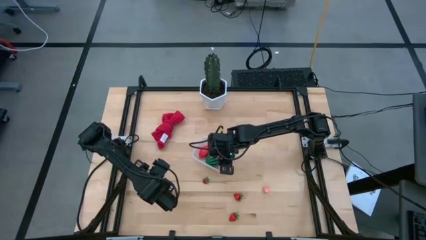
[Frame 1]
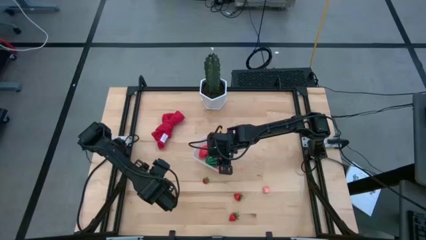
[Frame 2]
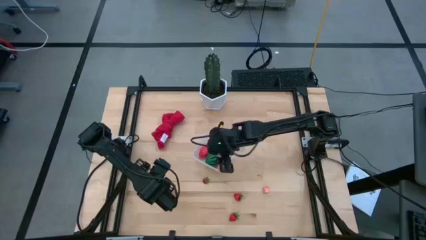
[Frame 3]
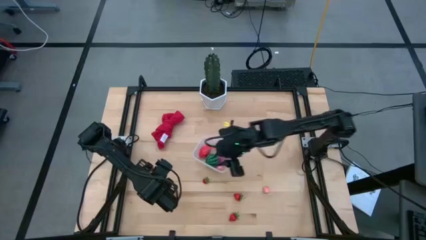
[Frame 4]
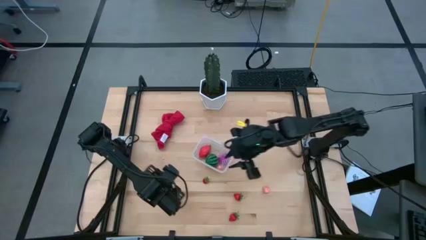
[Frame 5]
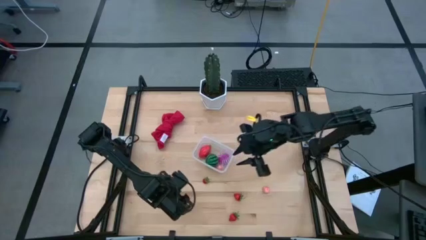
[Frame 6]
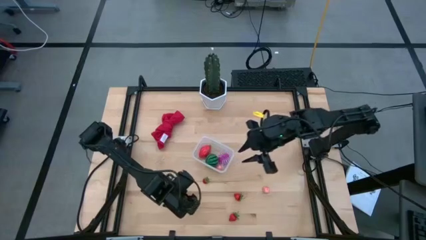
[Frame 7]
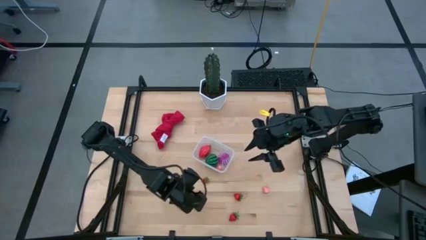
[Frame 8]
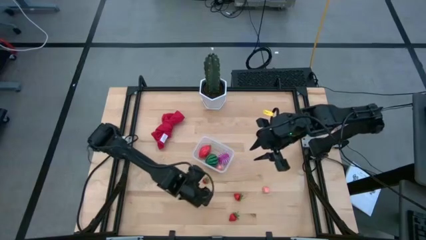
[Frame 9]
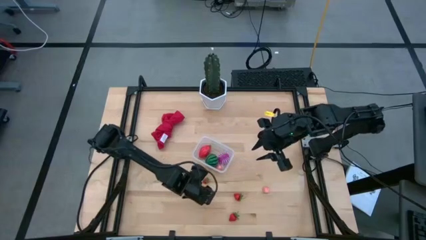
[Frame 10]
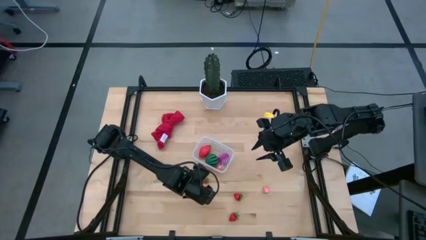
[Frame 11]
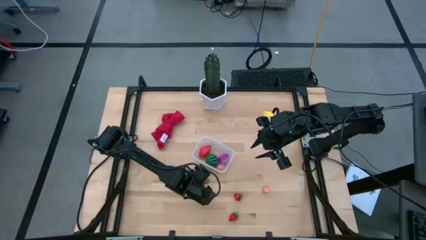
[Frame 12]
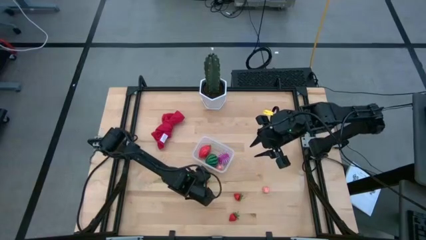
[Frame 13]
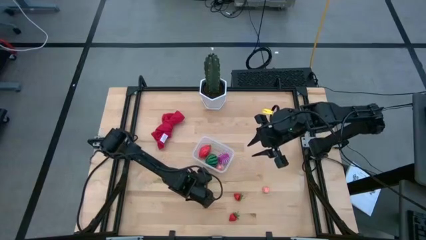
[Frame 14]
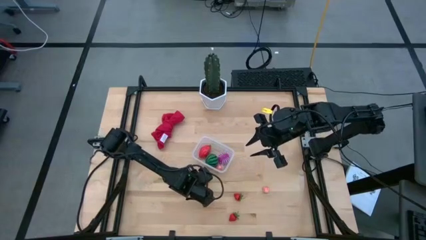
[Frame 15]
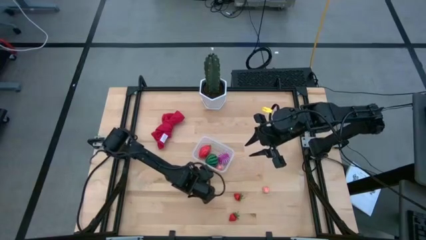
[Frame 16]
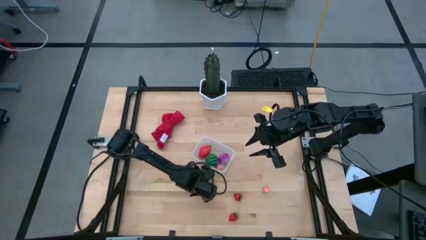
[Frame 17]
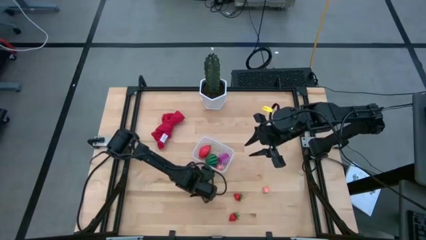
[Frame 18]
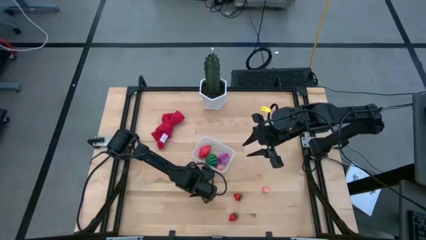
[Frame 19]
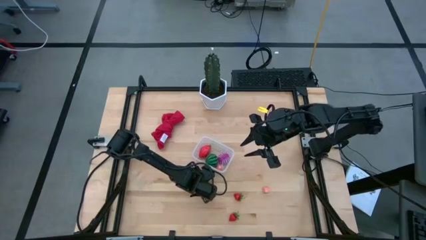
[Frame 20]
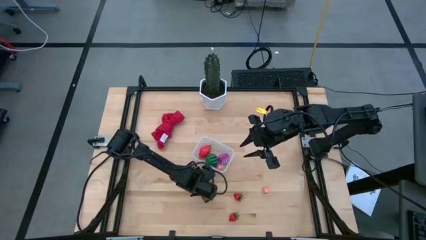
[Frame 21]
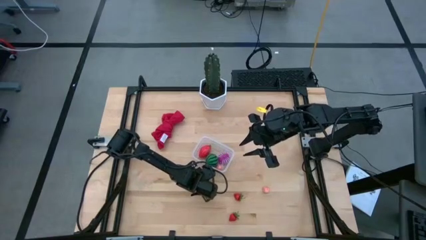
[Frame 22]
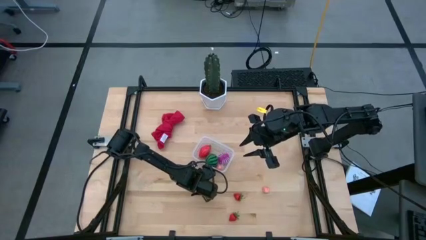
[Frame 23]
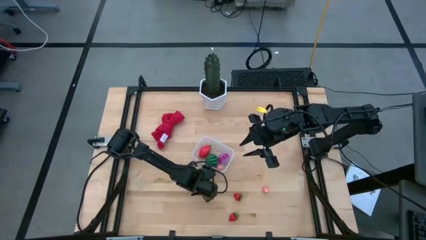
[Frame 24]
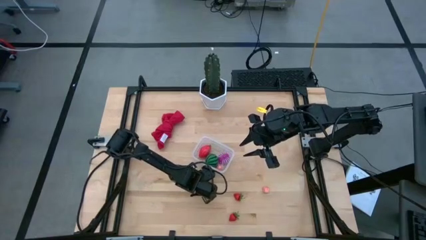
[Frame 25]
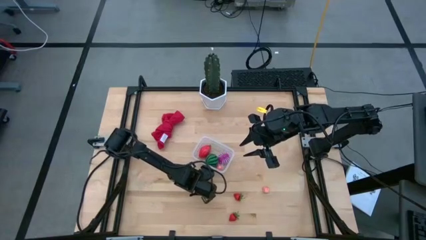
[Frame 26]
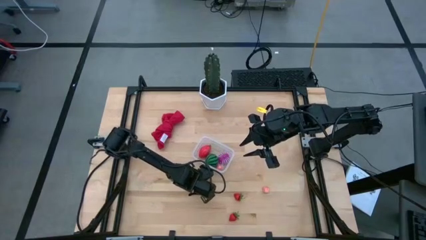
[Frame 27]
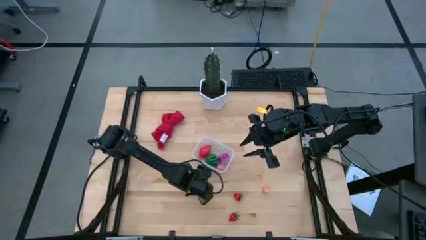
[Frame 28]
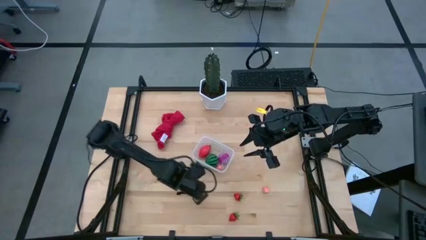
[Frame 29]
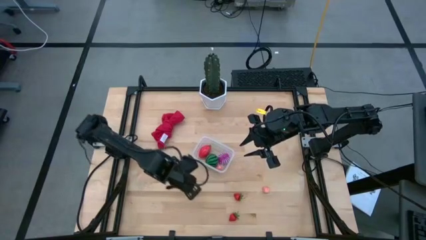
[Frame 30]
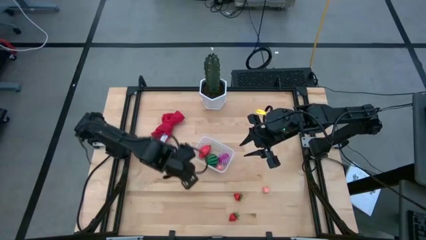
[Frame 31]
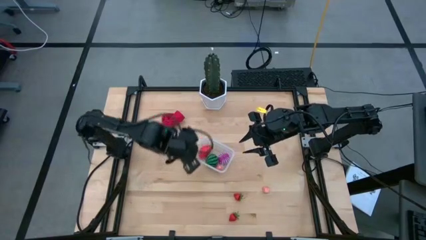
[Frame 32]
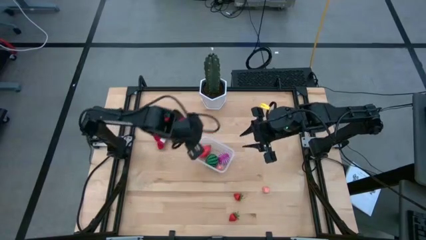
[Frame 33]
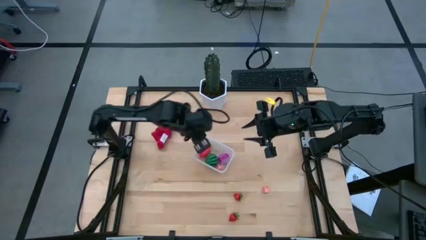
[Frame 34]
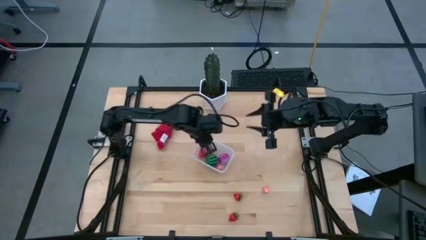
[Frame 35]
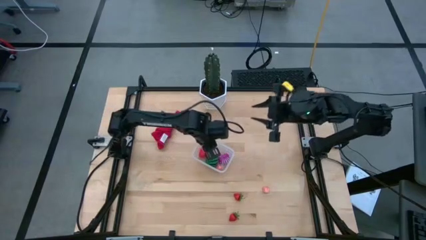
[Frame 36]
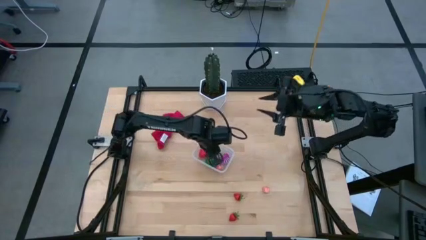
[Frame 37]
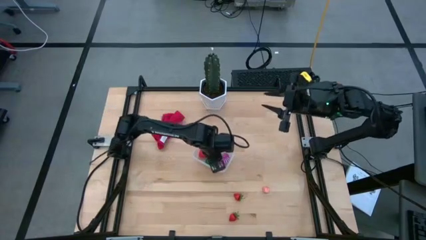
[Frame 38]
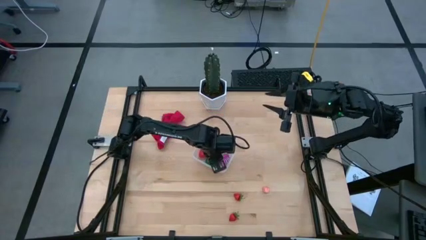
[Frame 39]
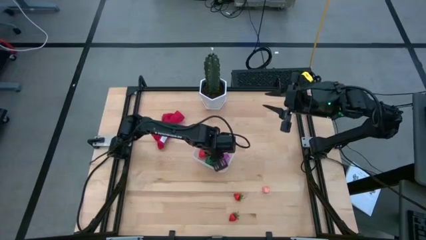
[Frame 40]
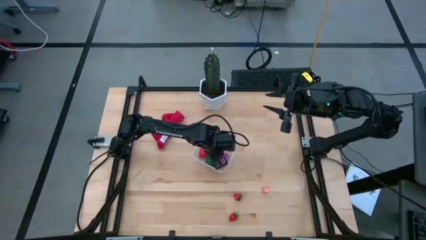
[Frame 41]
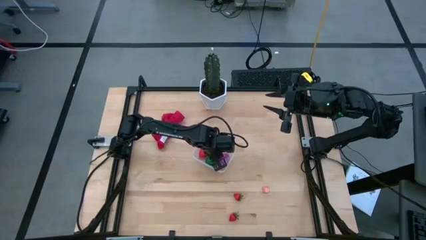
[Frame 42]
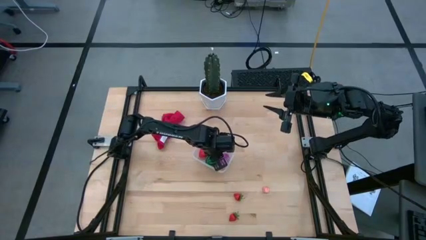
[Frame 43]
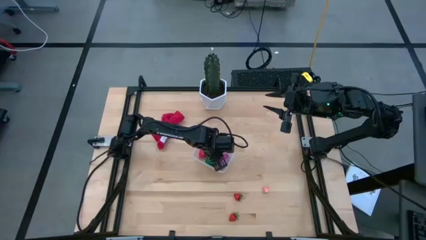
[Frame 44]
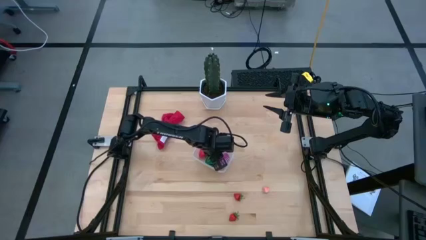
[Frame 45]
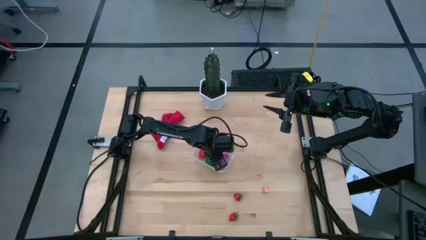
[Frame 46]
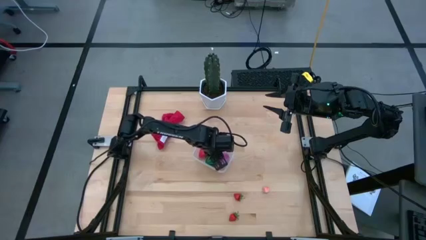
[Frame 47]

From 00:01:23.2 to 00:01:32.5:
Task: Pick and placing Produce into tupperware
Put the top red strawberry into the transparent container

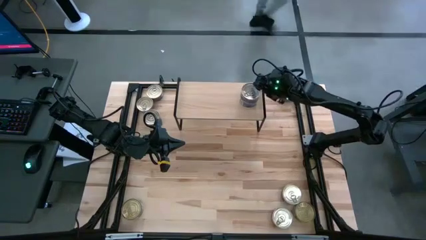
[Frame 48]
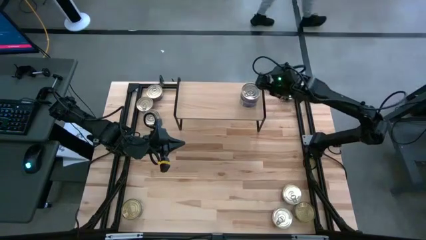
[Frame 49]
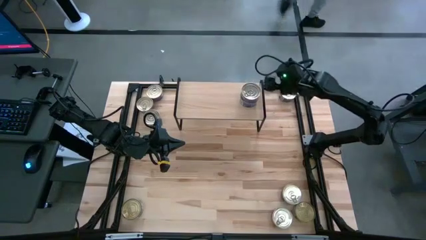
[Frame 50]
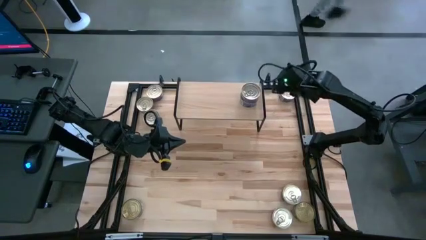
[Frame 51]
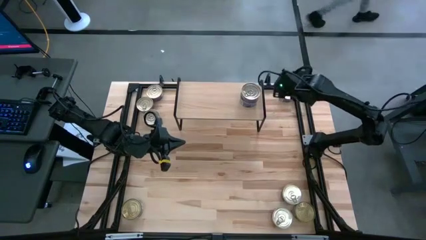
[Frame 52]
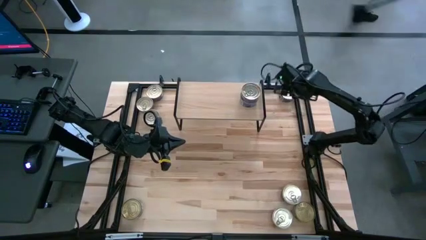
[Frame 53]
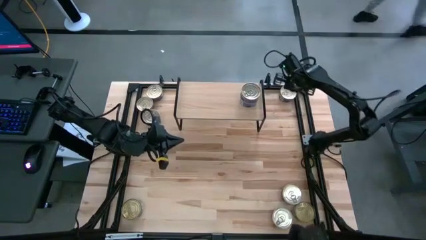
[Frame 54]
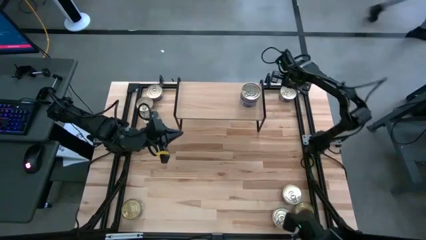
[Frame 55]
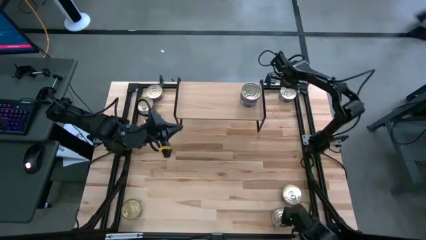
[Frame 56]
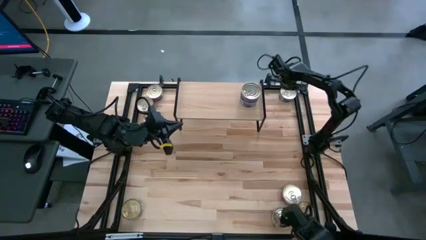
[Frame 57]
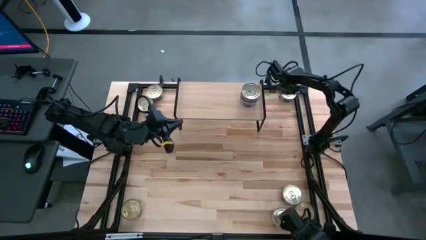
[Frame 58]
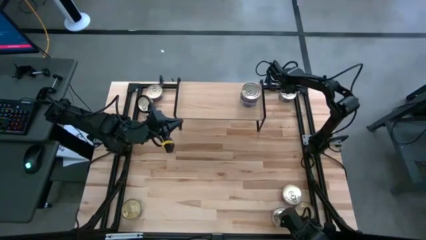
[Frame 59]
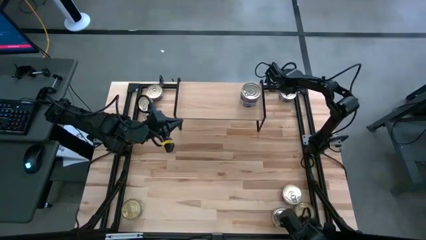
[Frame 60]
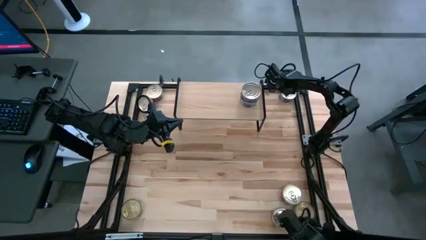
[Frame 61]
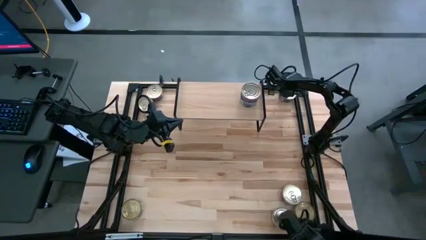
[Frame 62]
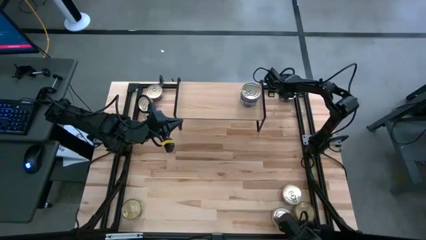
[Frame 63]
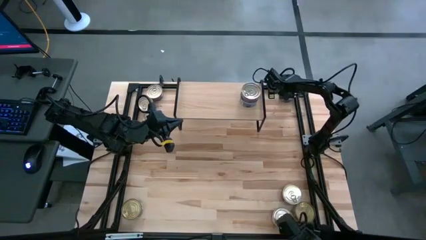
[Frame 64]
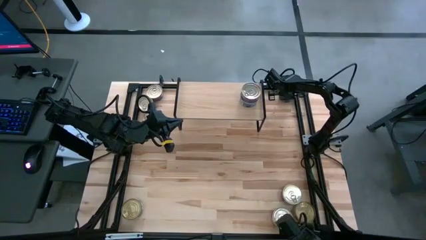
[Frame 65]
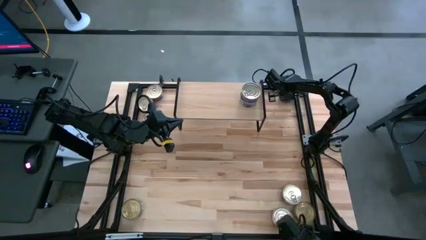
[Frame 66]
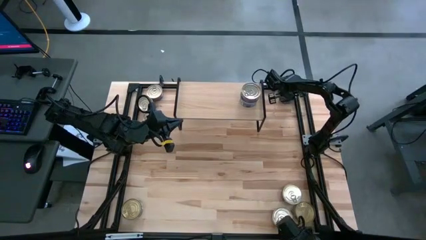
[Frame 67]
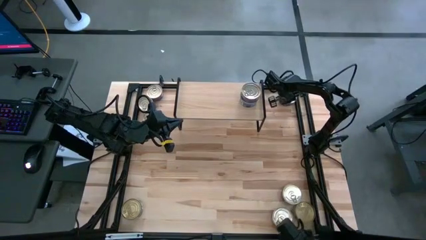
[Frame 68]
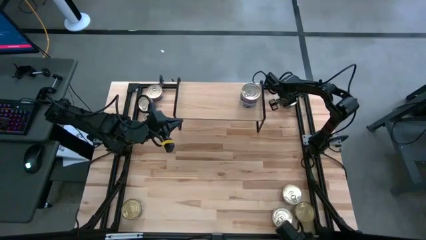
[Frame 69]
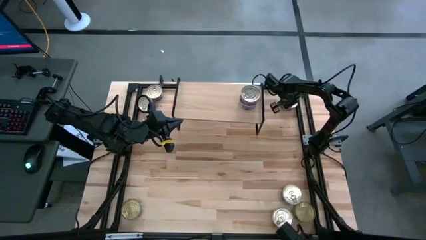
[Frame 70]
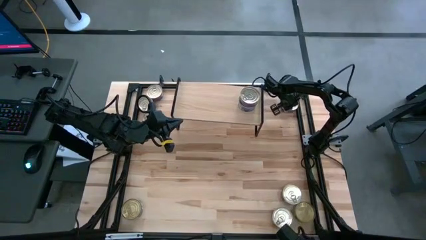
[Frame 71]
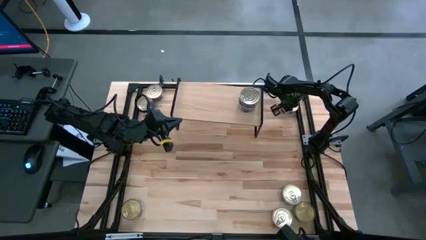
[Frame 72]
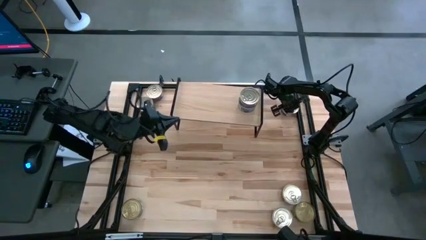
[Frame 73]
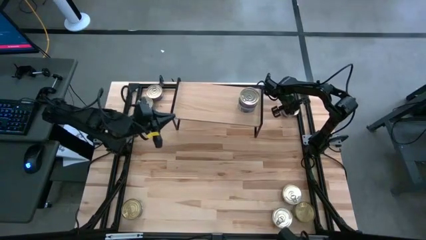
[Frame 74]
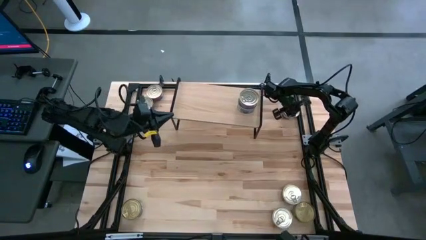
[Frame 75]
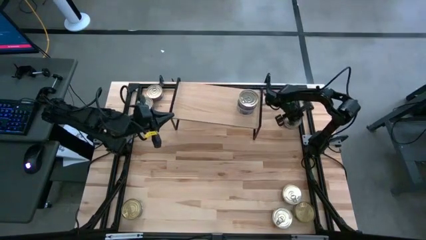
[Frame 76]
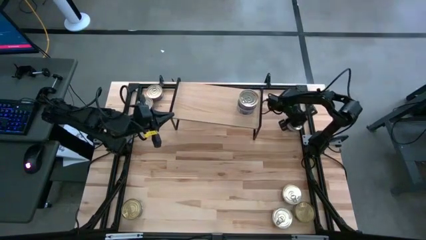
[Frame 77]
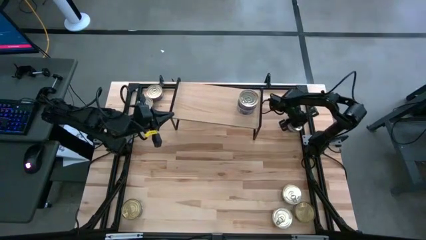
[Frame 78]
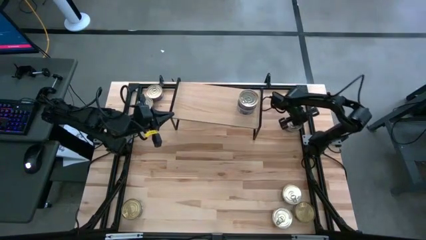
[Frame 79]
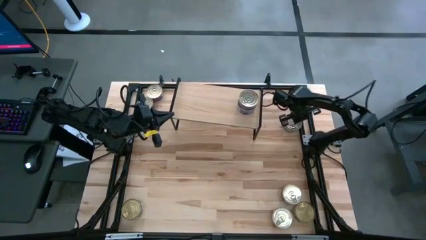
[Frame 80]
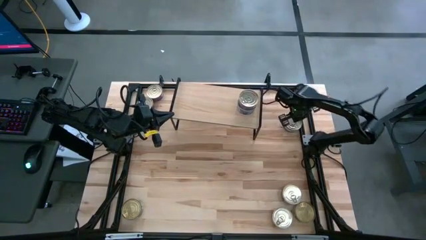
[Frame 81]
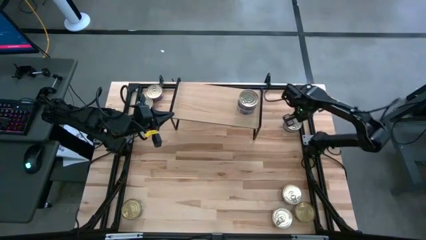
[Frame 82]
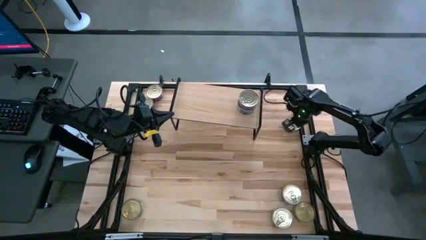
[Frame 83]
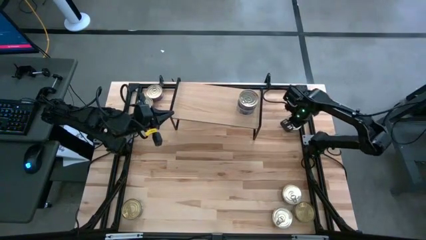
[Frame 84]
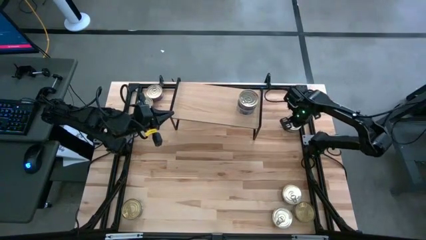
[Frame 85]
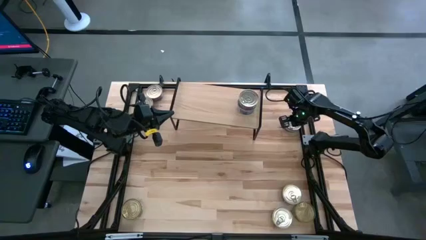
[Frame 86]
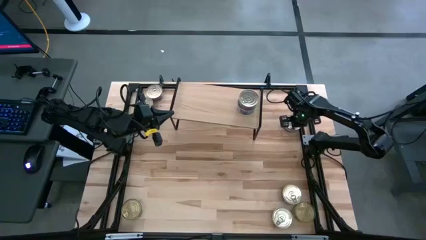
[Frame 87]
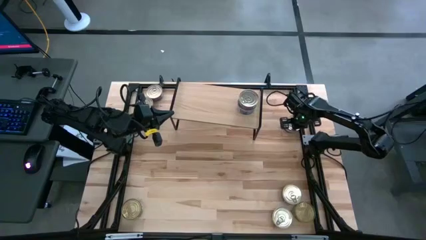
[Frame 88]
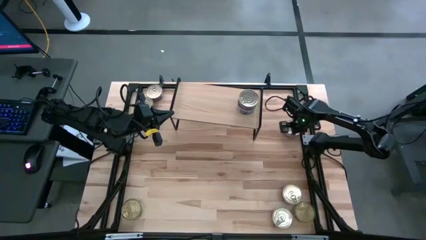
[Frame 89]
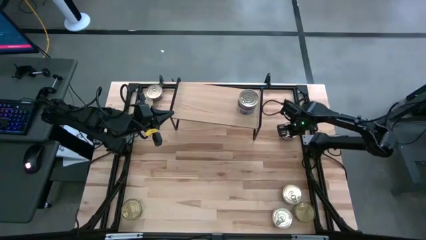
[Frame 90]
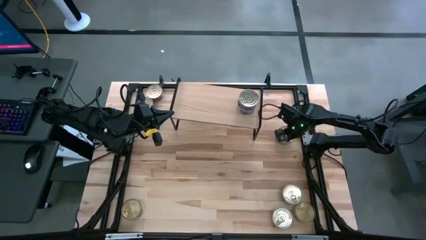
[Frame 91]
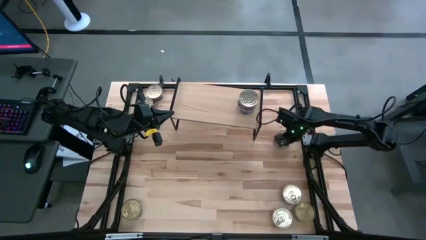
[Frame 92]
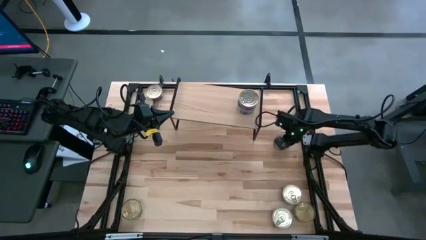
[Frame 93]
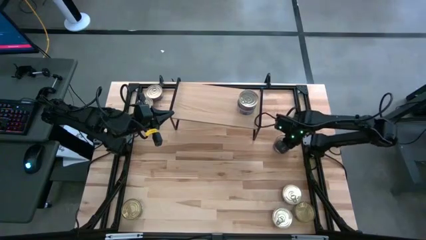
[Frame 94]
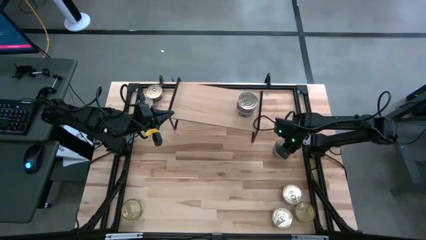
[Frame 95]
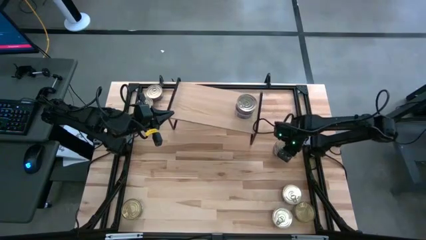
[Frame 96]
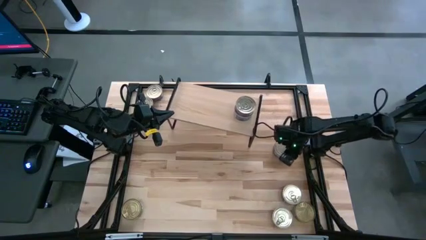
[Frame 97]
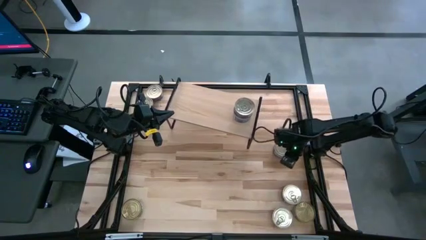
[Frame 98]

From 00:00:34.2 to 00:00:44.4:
Task: Stack canned seafood by type on shelf
Stack the blue tuna can on top of the stacked blue tuna cans on the shelf
